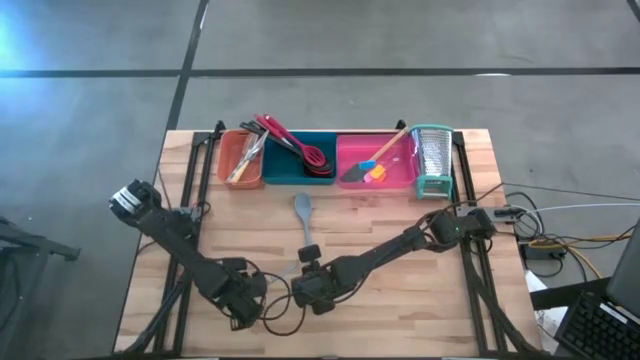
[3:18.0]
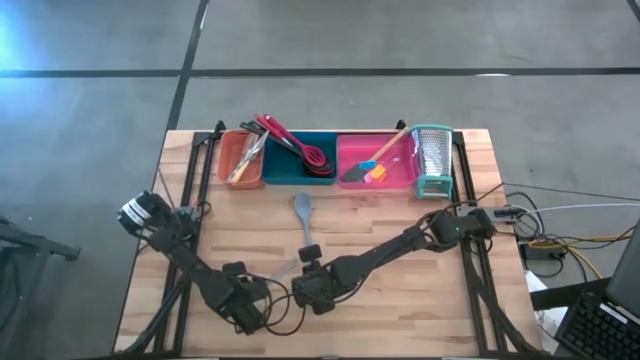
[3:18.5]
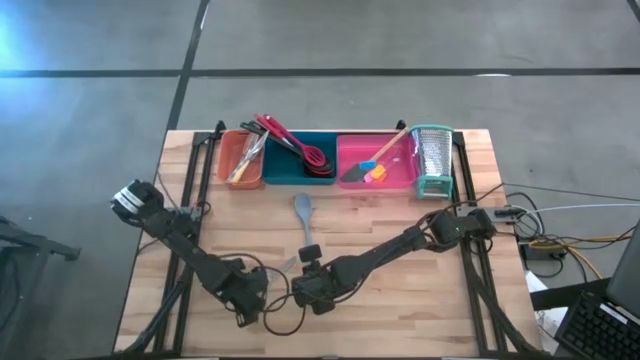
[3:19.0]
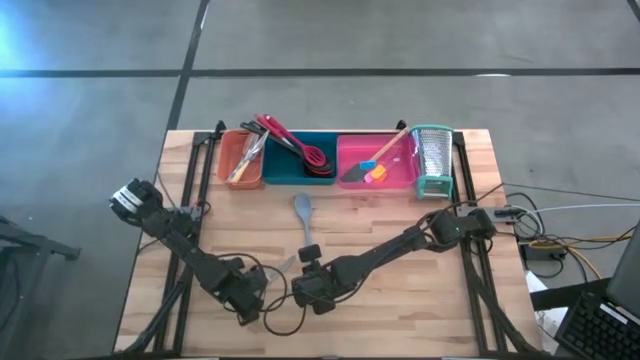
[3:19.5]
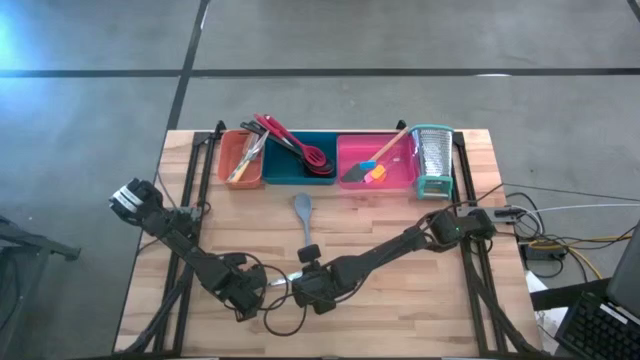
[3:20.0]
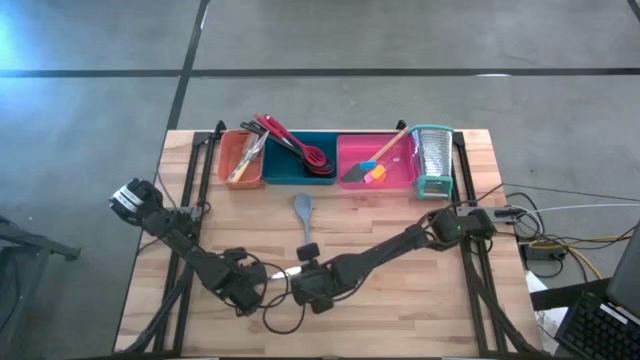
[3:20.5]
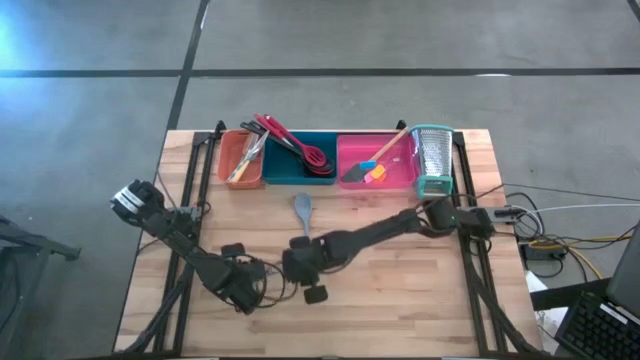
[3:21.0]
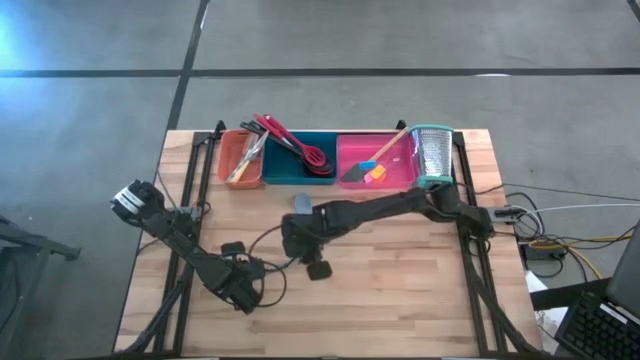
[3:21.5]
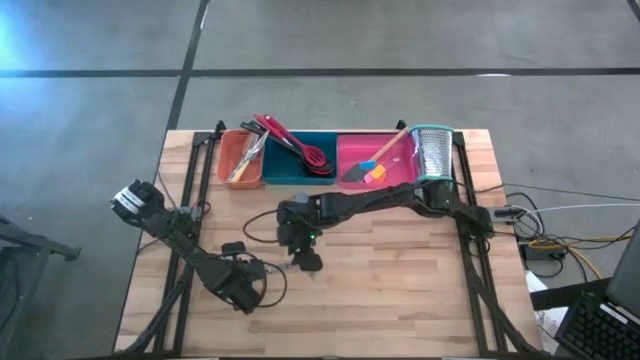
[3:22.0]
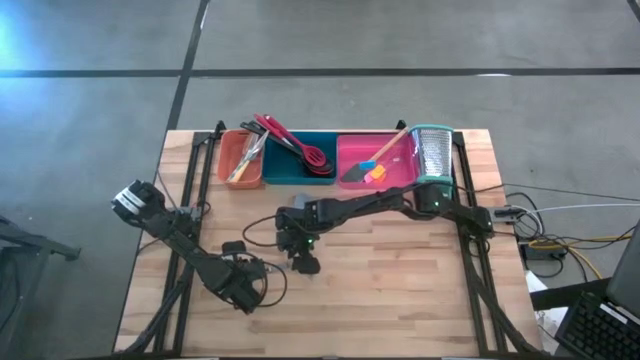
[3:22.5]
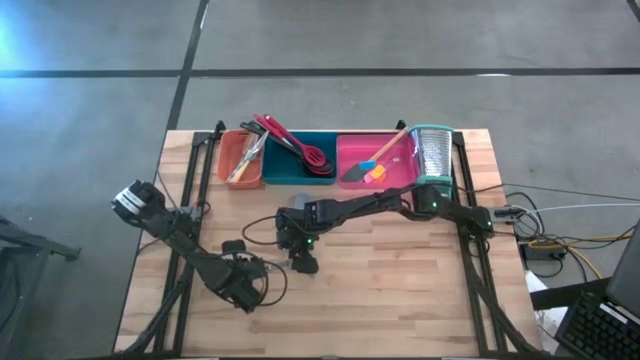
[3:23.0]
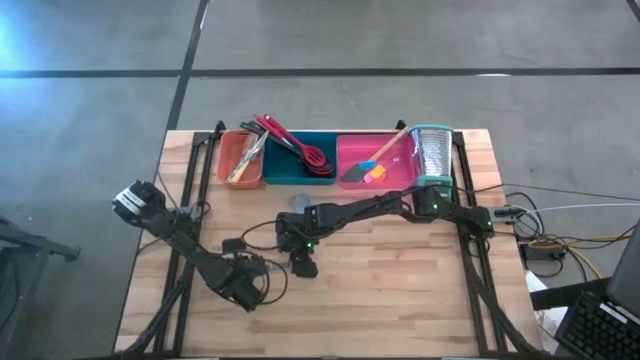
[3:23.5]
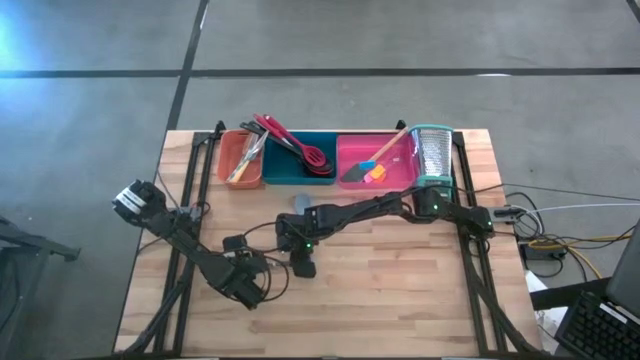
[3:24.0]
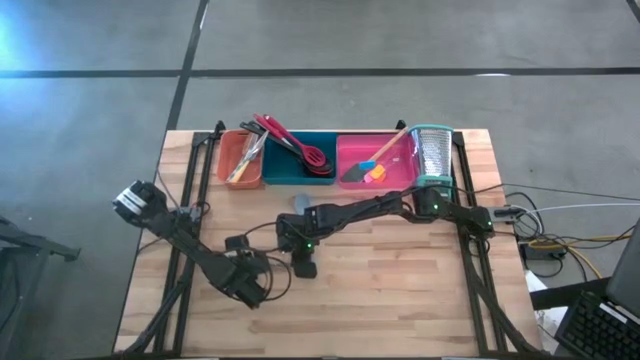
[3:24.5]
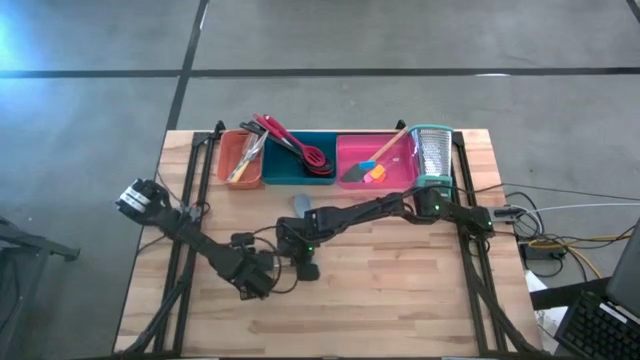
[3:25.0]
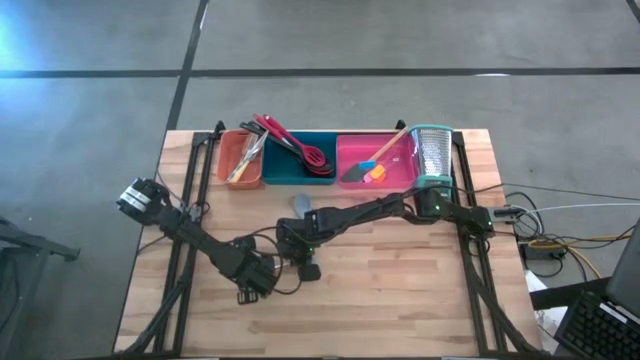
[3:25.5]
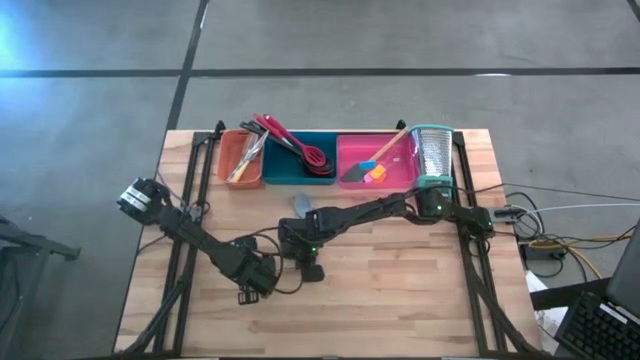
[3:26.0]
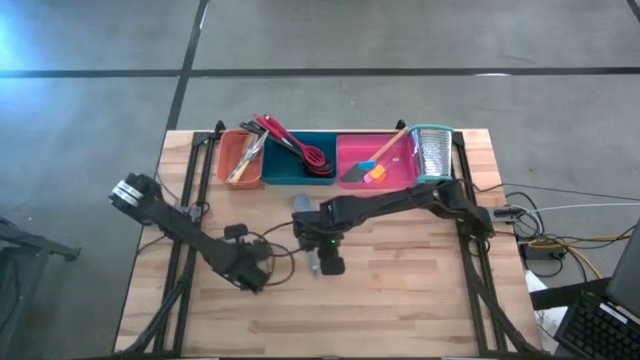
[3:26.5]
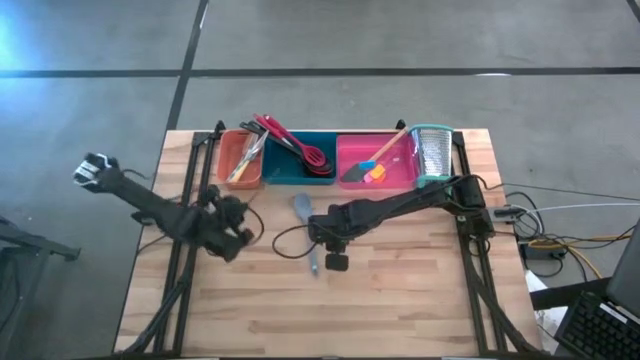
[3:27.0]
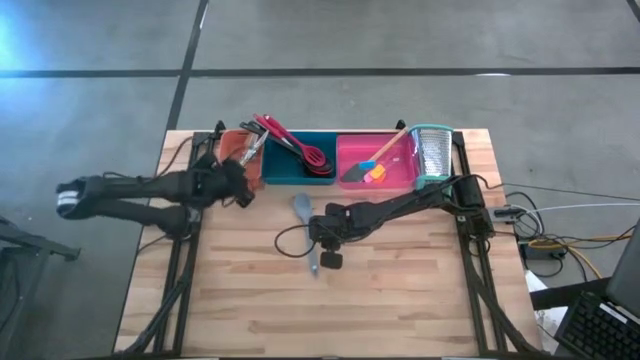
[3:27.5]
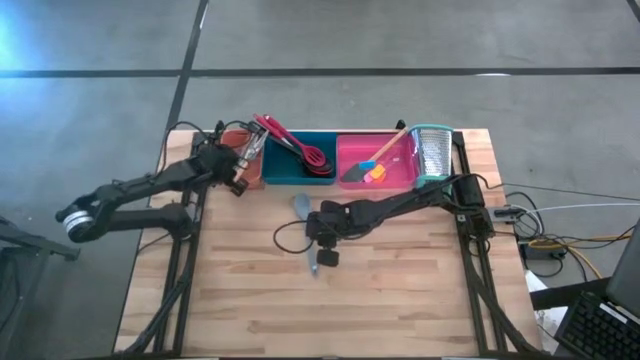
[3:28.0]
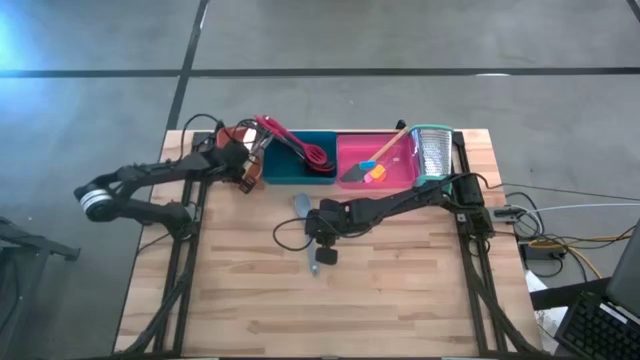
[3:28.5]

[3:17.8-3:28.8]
Task: Pick & Place Kitchen Items
Put the silver knife into the orange bin

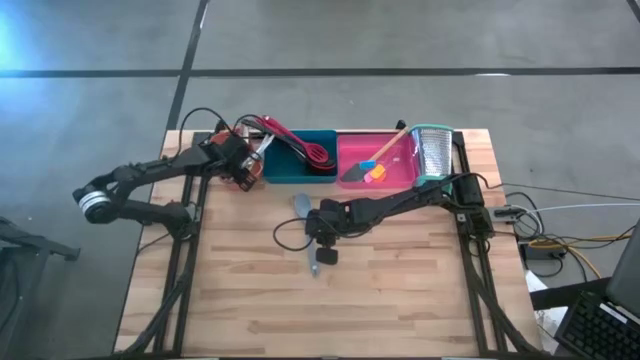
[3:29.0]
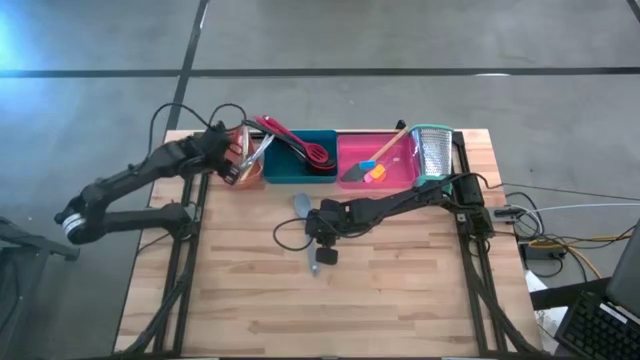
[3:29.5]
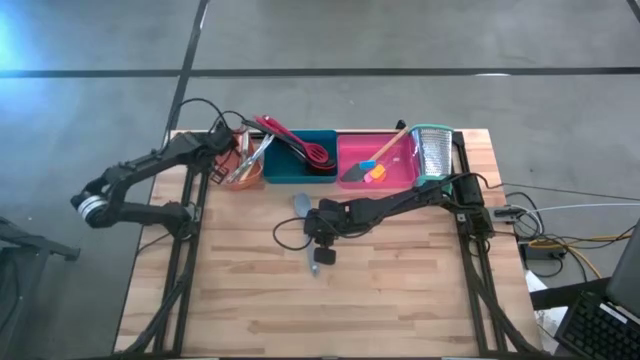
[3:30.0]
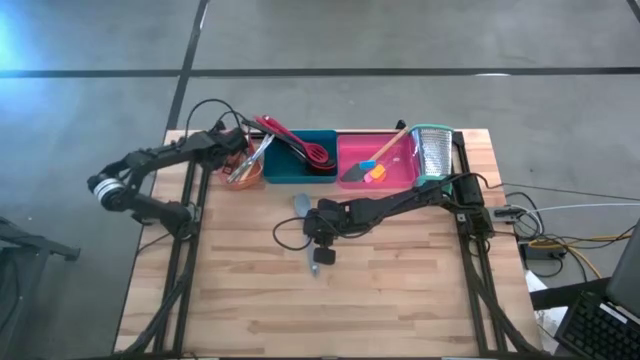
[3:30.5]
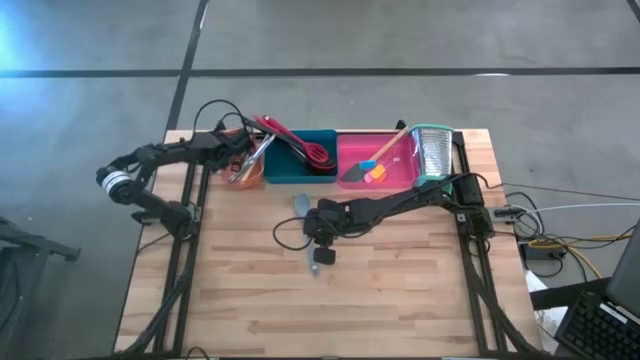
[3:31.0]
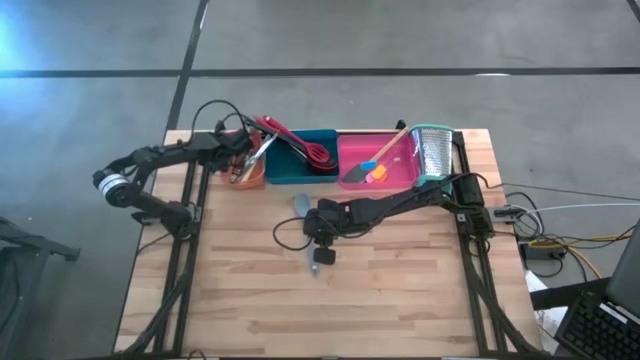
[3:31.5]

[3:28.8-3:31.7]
Adjust the orange bin on the table

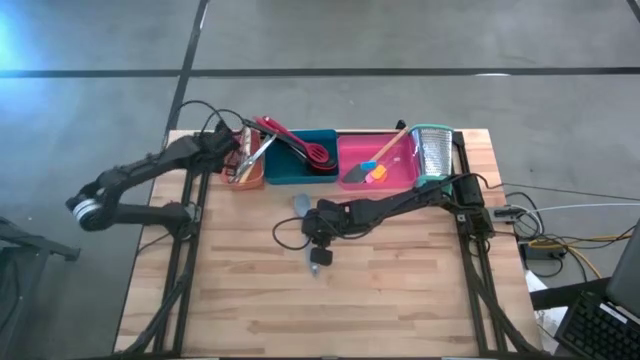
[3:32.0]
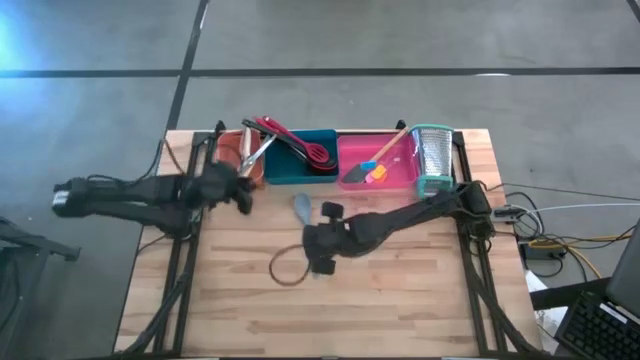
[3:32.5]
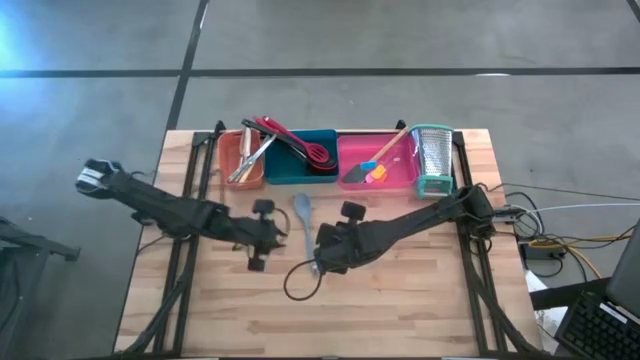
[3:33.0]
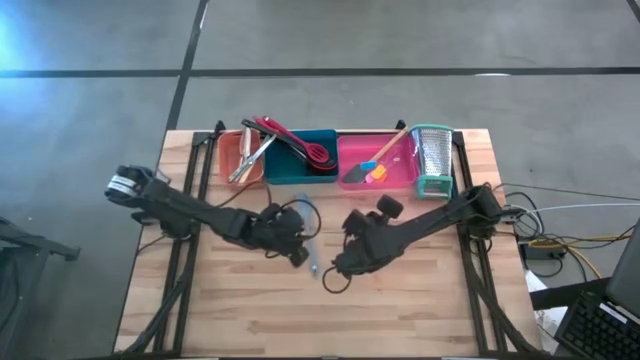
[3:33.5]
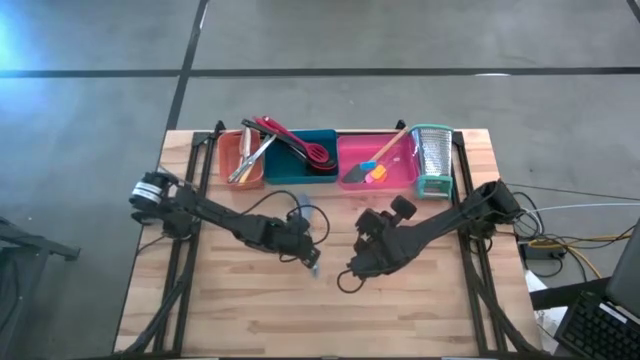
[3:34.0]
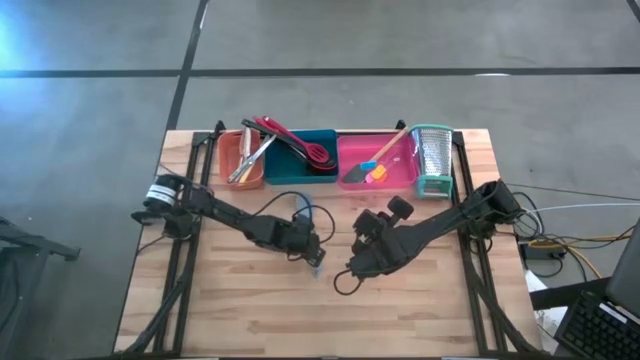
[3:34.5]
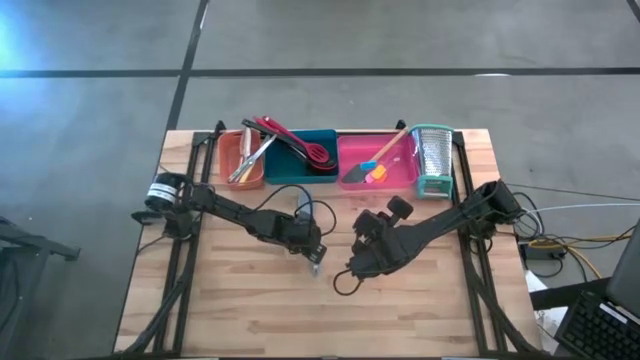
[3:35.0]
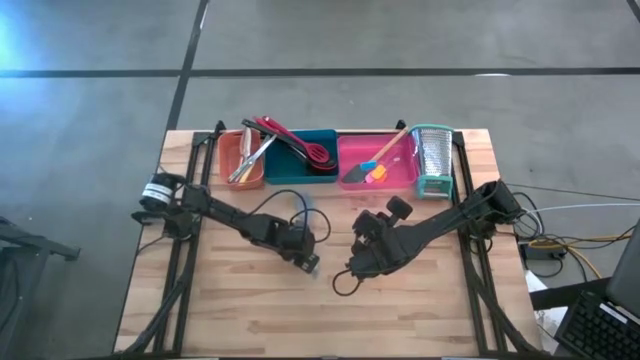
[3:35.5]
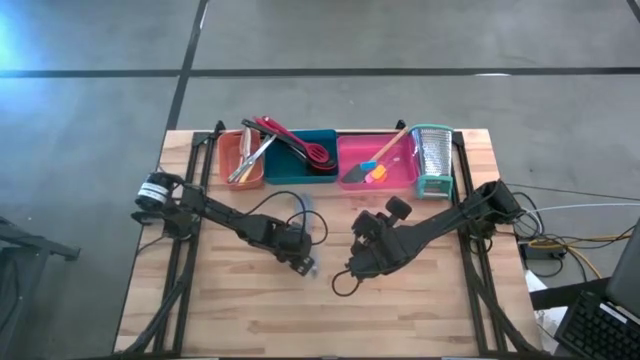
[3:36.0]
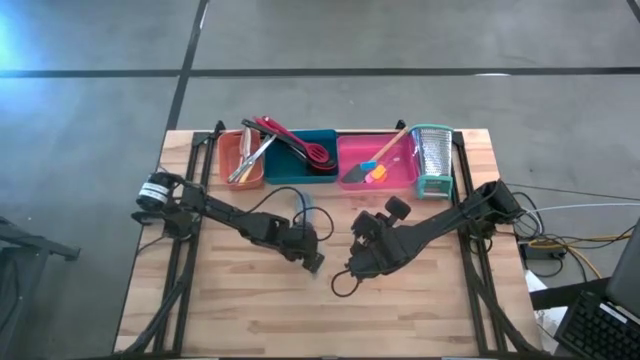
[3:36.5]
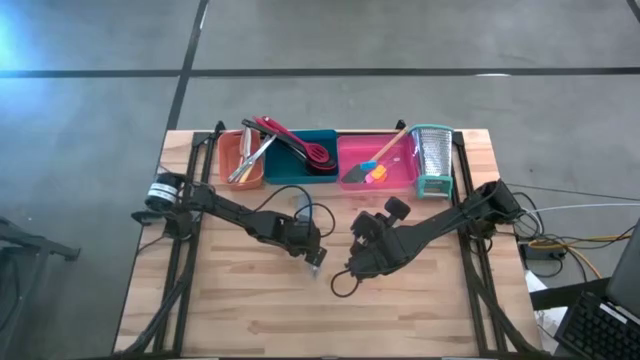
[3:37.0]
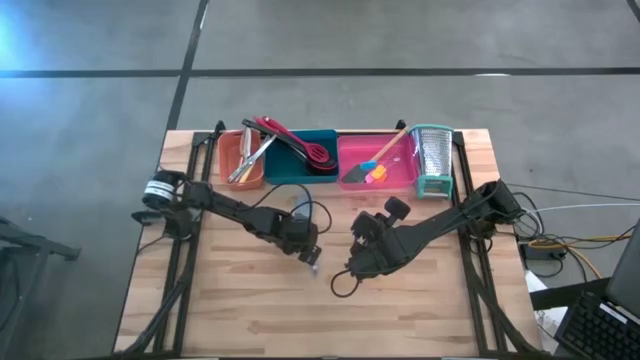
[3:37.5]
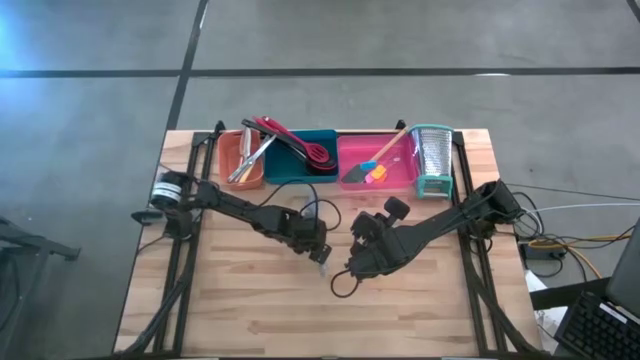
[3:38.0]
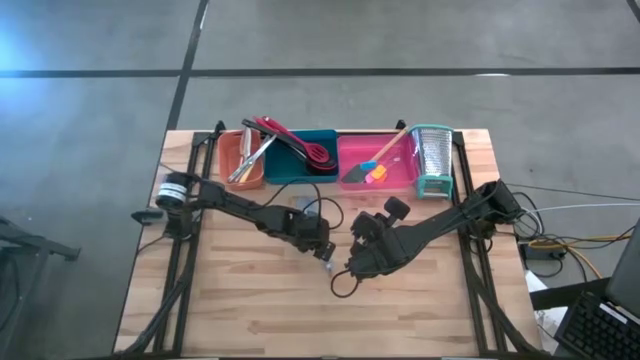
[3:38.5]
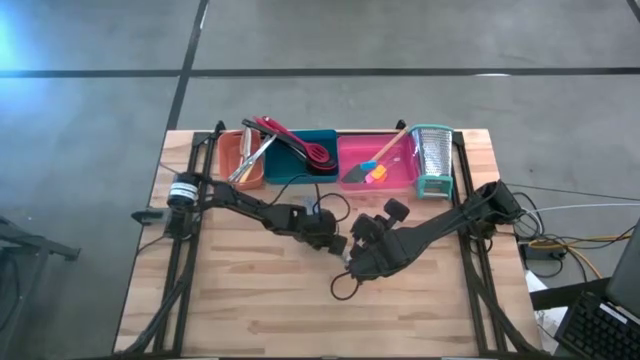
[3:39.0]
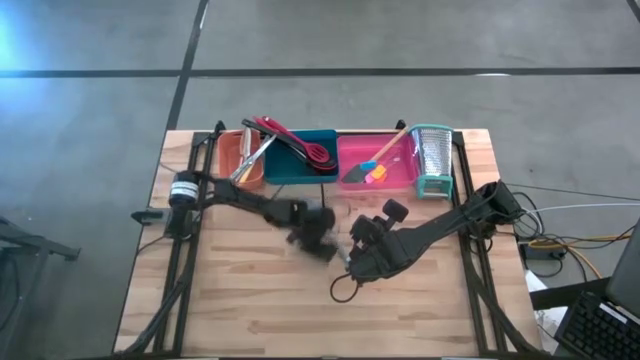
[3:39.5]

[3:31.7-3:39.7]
Put the gray serving spoon into the blue bin

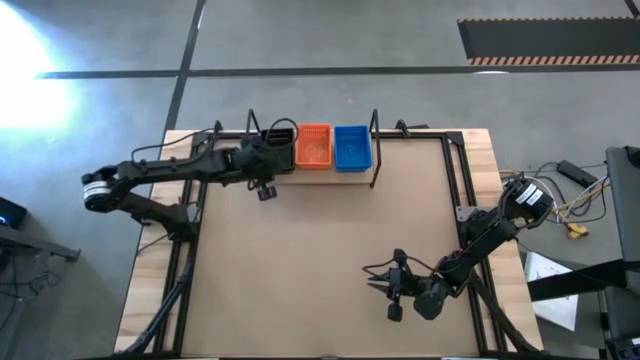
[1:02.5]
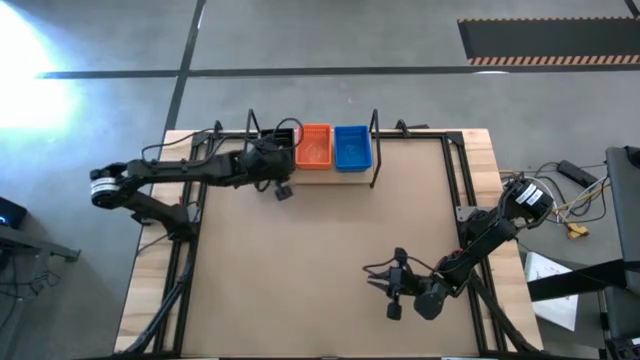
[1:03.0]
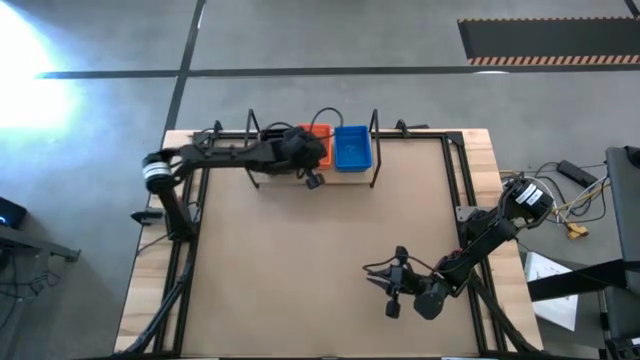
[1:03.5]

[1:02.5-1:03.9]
Task: Stack baskets on shelf by color
Adjust the stacked orange bin on the shelf
